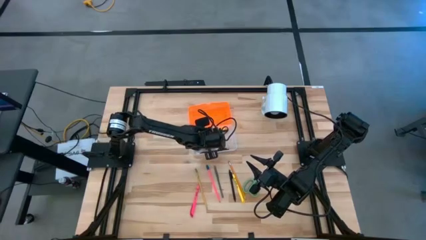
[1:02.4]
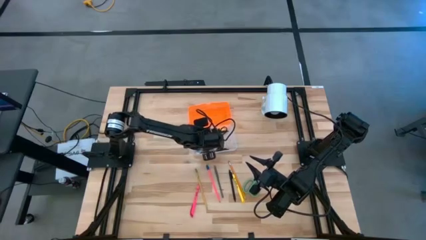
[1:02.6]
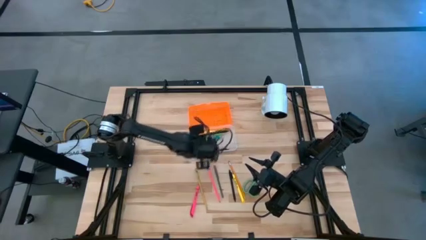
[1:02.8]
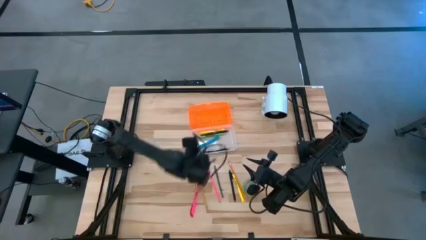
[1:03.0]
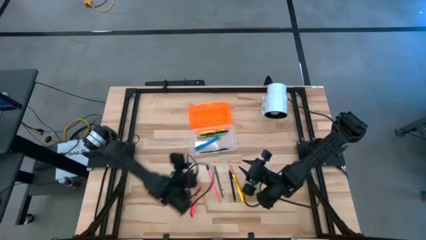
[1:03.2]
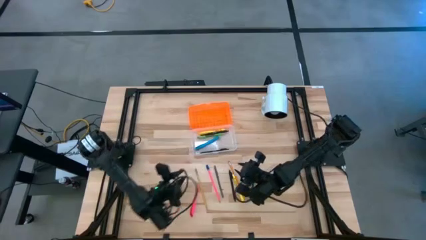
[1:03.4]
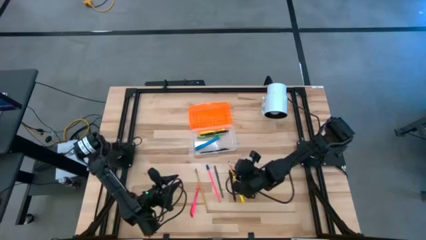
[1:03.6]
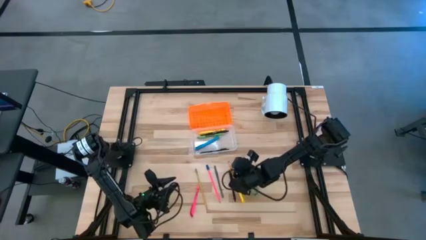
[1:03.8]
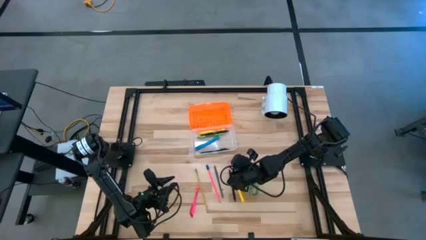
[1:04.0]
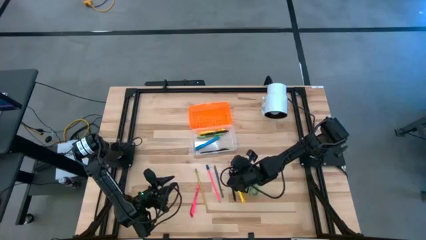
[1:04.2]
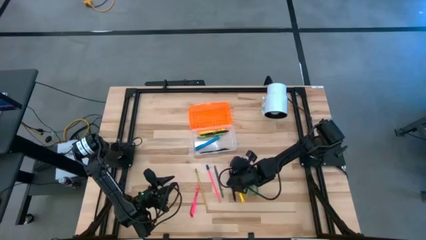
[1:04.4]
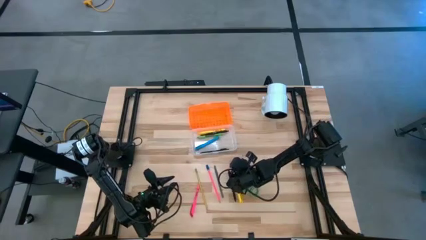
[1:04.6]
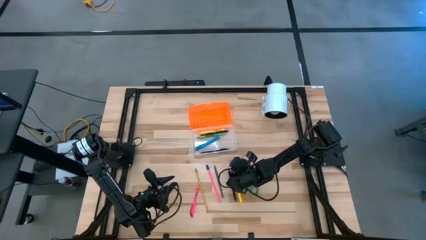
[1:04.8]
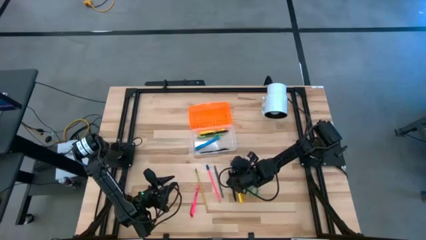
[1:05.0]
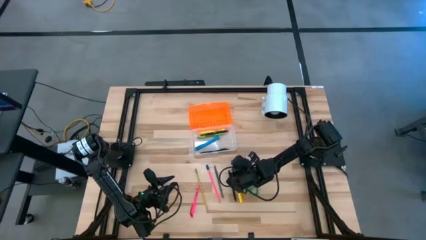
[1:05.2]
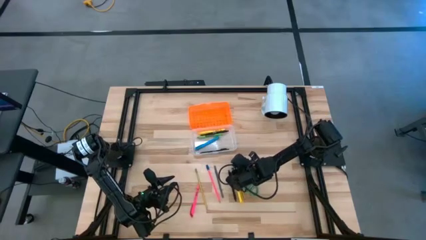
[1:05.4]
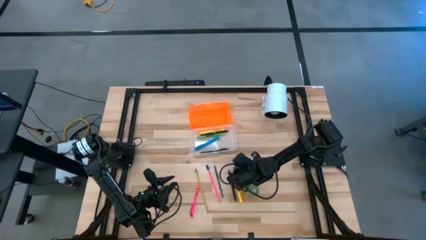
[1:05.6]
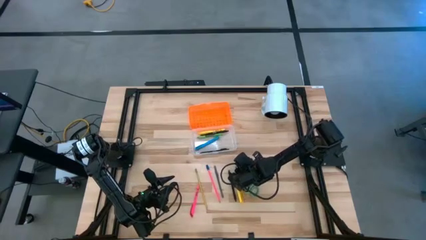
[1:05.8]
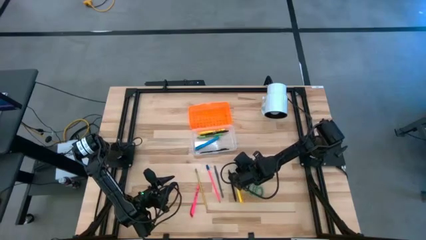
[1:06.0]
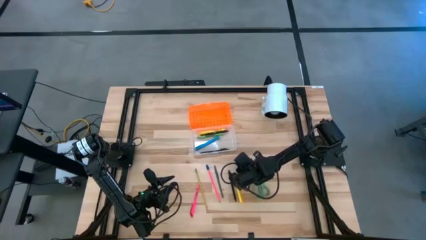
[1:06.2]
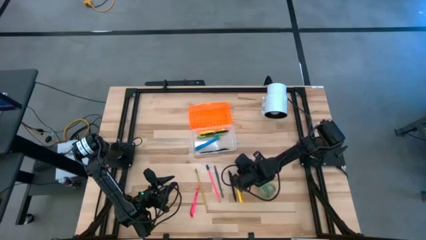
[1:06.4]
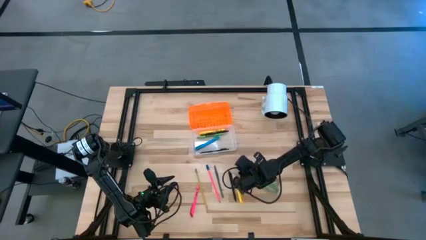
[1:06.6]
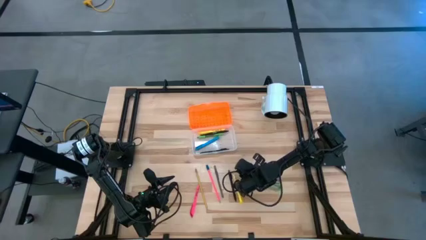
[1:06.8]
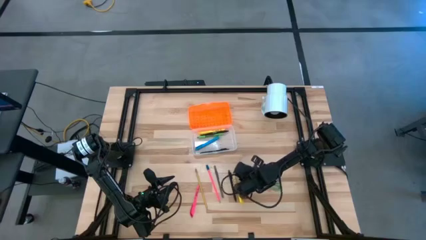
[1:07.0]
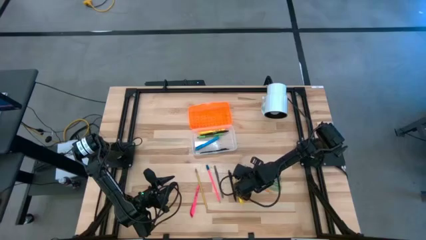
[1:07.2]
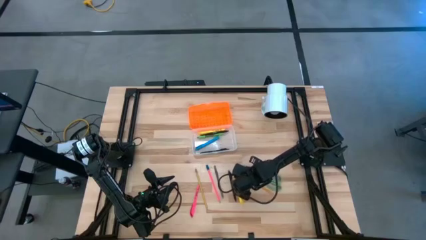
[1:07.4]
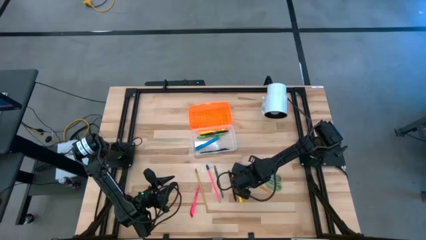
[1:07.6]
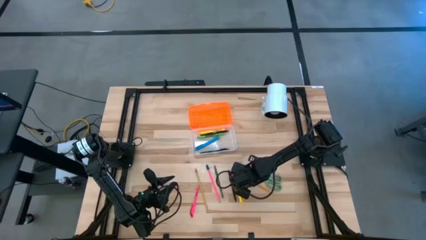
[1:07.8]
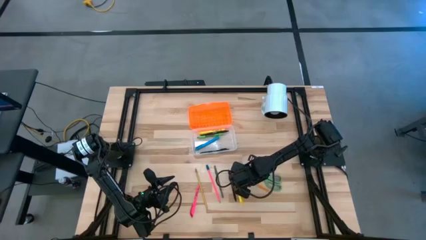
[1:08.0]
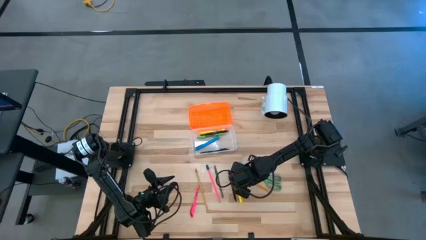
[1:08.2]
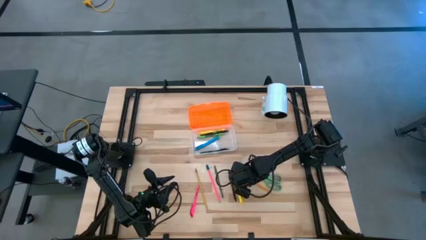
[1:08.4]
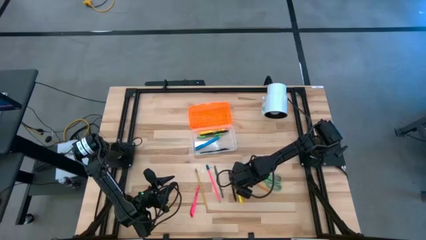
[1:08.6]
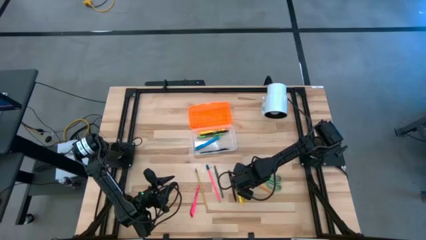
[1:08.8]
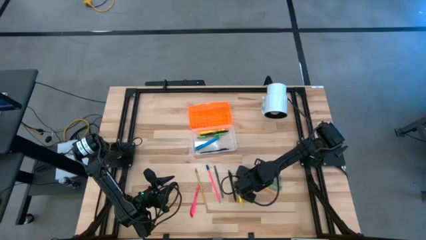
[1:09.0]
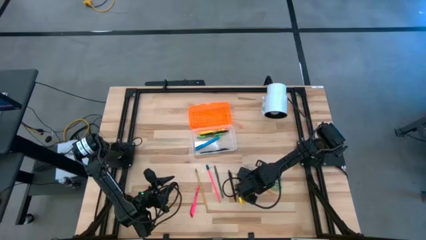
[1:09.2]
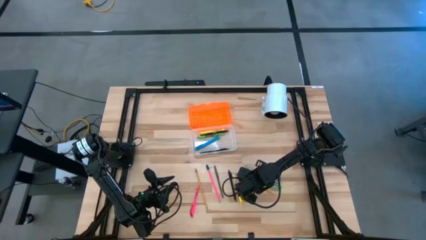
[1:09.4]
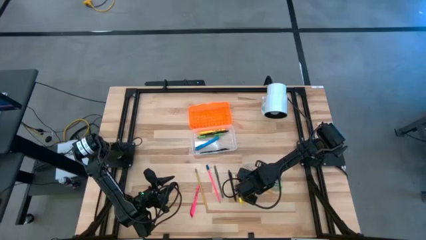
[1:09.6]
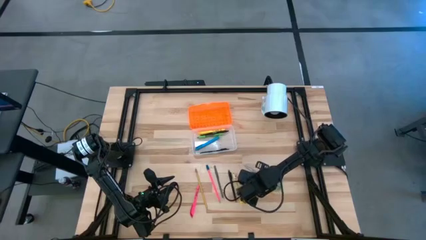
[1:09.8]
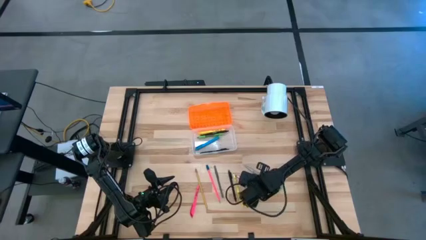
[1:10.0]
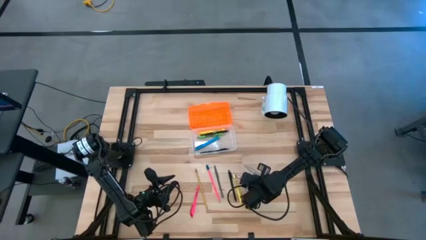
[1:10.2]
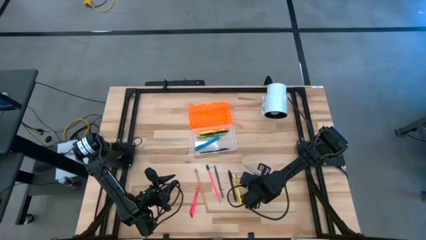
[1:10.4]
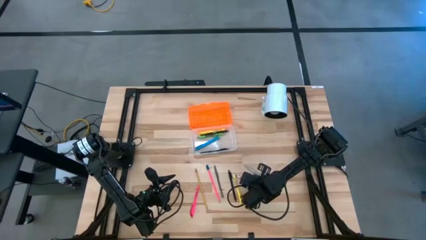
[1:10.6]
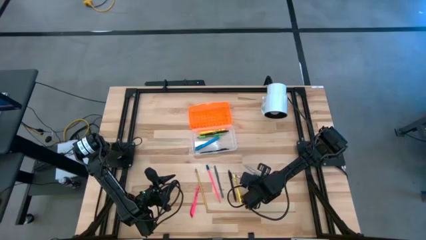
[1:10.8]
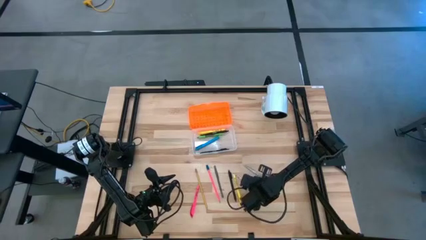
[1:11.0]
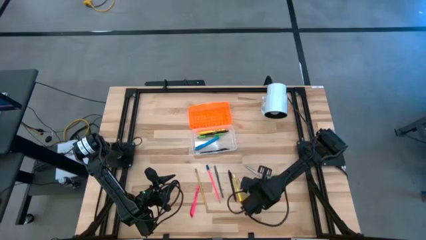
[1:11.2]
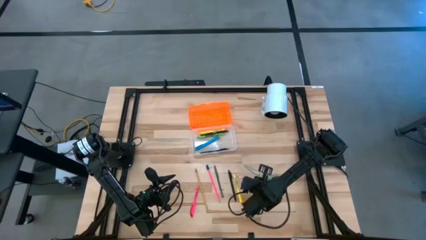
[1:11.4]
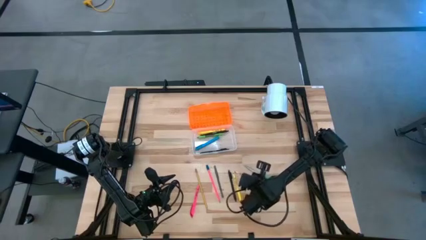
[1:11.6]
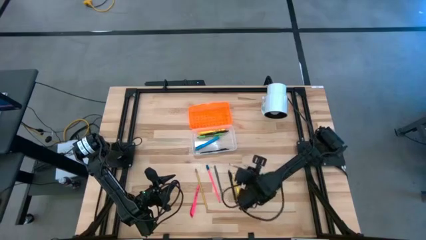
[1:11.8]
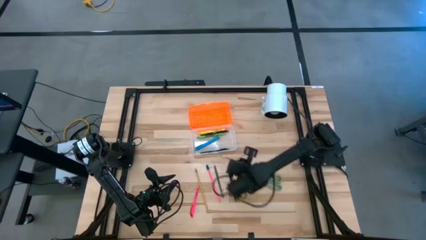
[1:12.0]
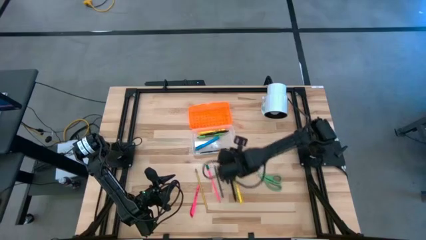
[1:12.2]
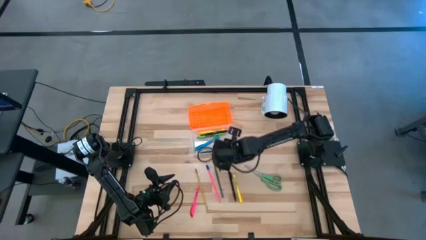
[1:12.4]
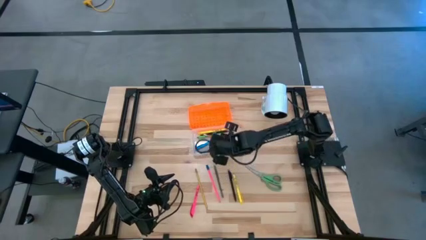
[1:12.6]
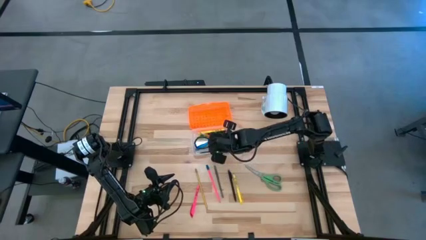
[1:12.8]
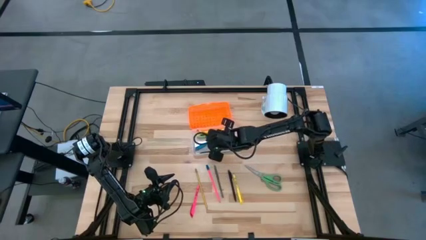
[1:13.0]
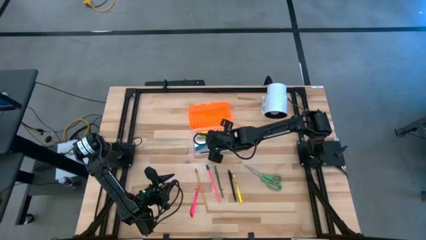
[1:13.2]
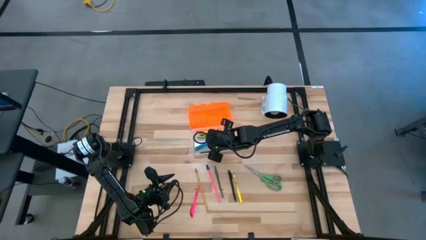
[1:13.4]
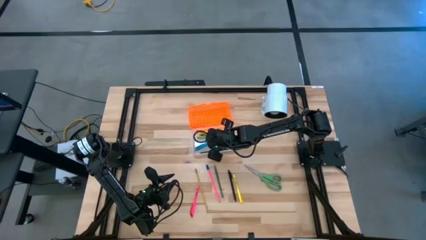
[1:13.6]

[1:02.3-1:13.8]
Task: Pick & place school supplies into a supply box
Put the orange pencil into the supply box

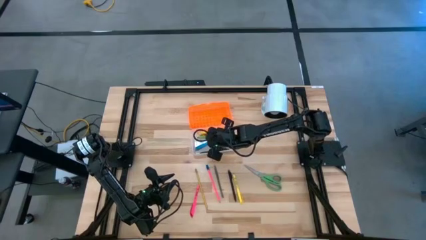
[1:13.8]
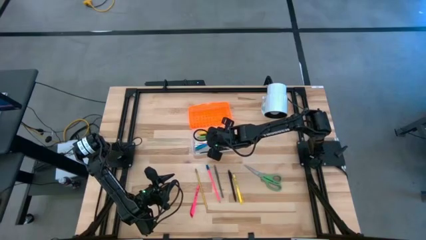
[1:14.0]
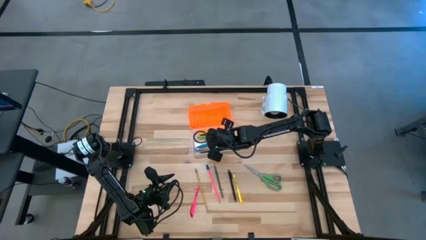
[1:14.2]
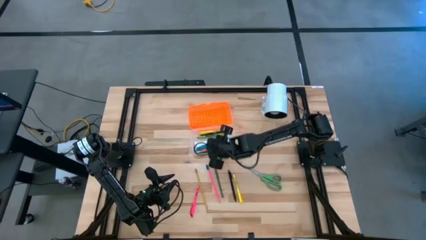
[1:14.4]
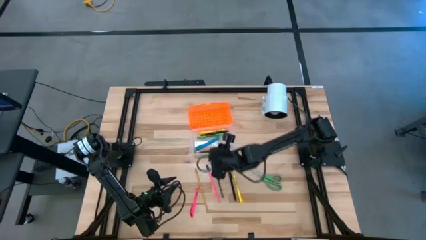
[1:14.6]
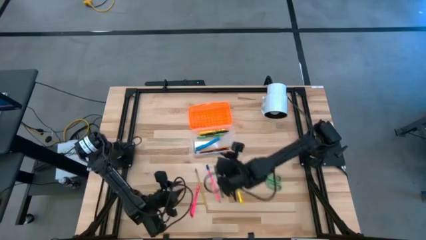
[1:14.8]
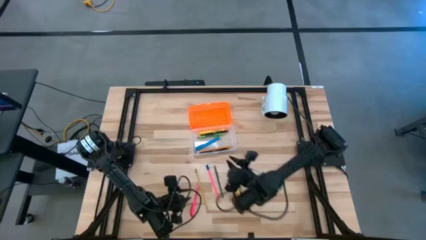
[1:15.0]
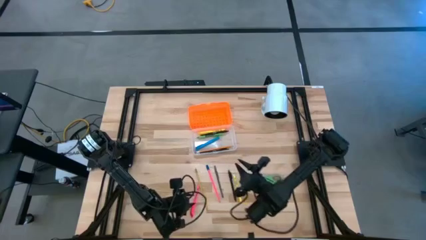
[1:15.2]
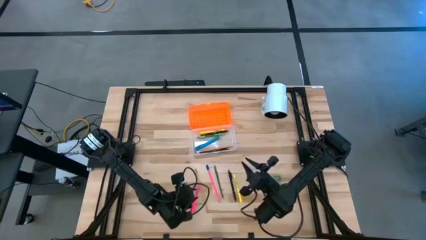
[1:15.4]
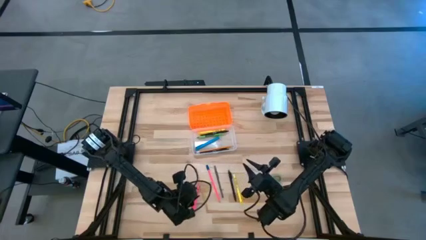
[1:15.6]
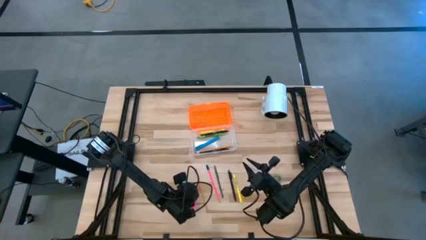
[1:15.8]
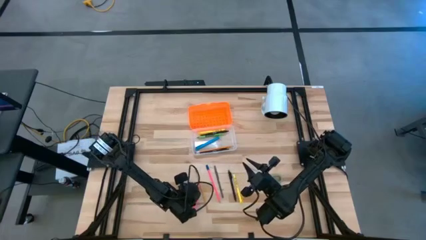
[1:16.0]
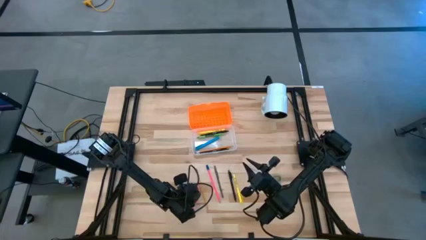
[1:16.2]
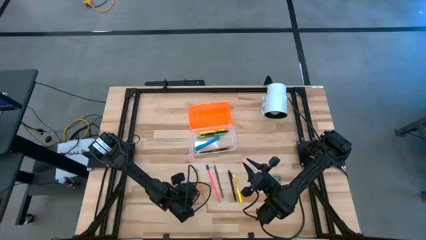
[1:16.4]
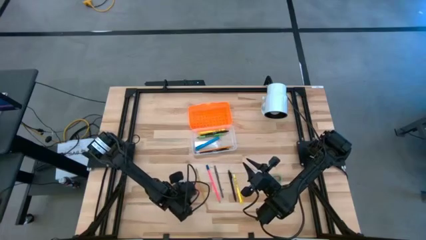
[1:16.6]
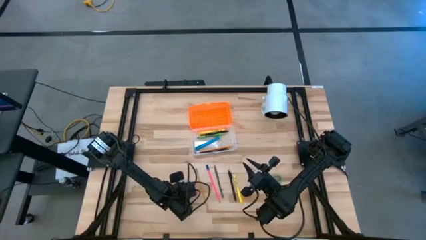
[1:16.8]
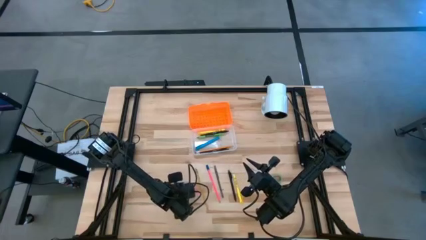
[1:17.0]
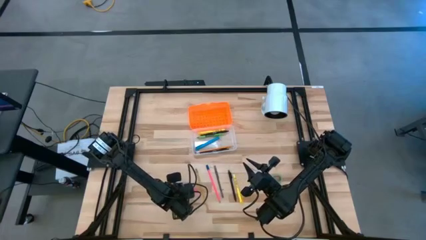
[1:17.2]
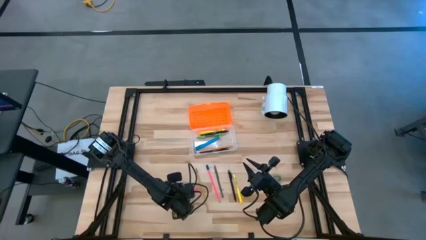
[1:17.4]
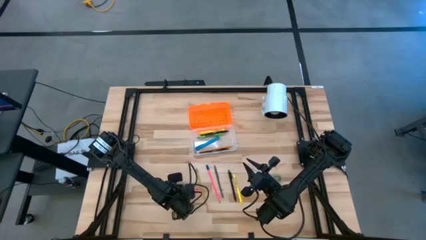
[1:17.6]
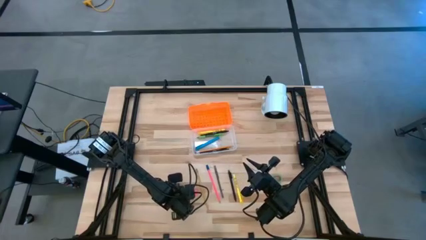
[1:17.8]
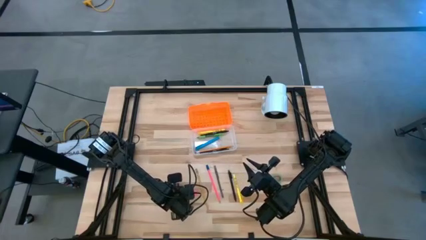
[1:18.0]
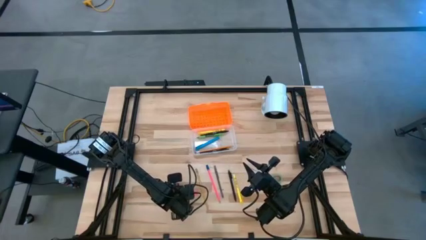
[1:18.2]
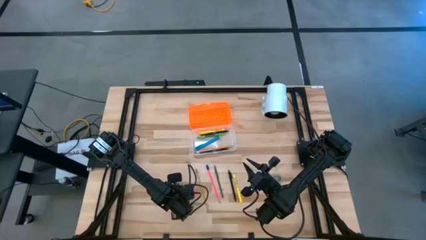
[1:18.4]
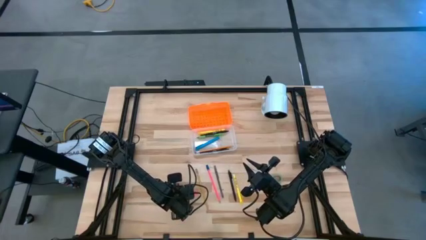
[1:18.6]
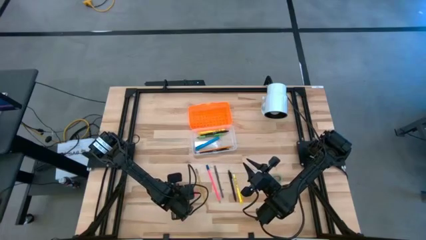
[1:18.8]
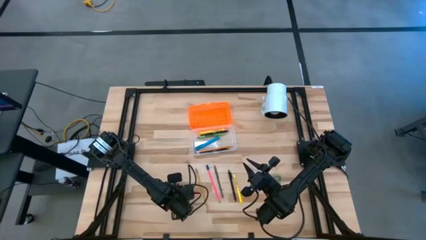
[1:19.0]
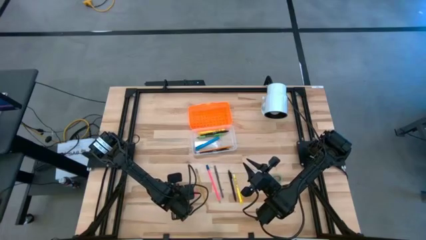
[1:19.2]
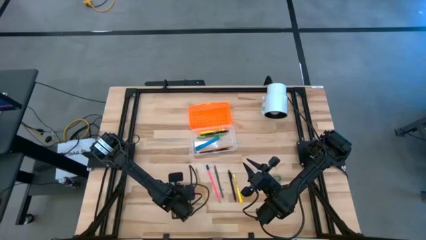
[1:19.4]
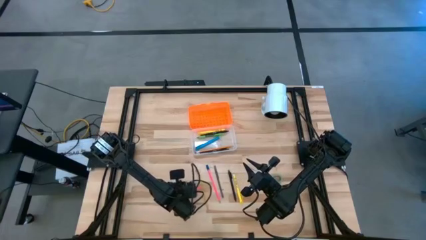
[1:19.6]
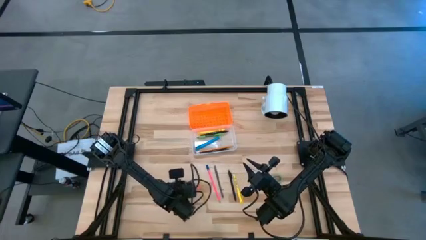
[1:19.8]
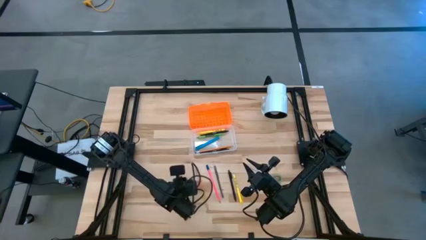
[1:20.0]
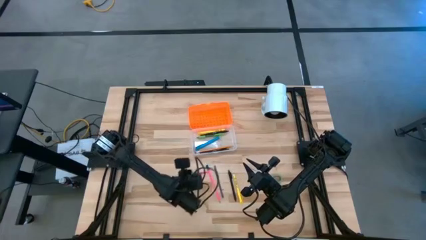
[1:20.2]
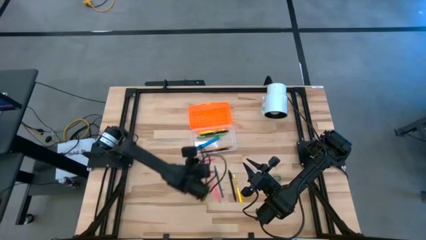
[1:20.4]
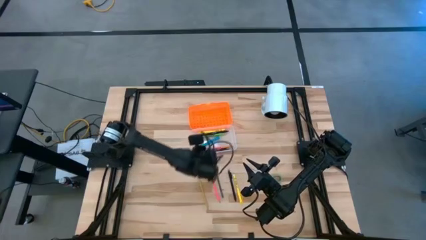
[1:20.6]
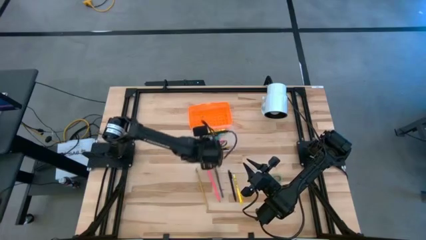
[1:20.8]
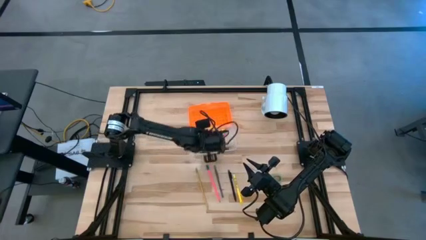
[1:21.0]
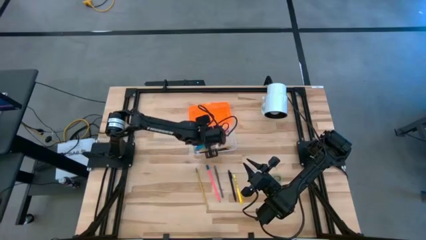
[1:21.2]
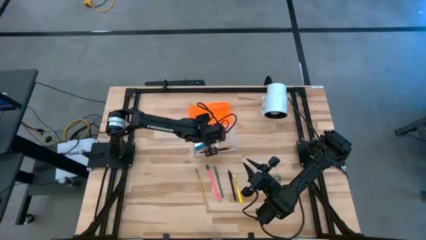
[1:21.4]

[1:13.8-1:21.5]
Put the pink pen into the supply box
